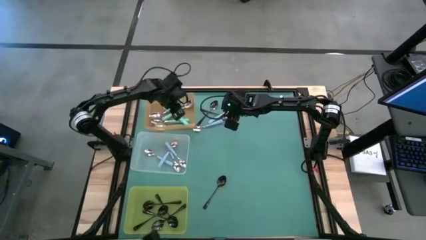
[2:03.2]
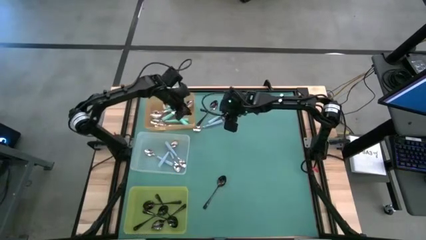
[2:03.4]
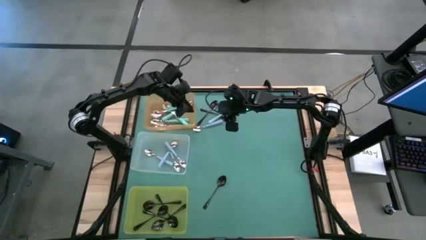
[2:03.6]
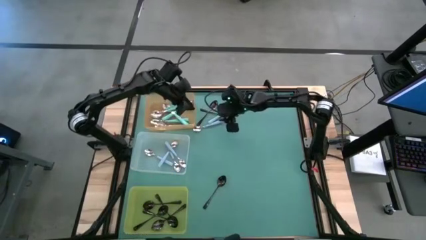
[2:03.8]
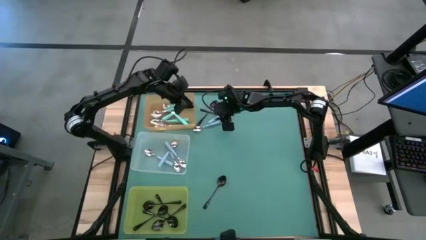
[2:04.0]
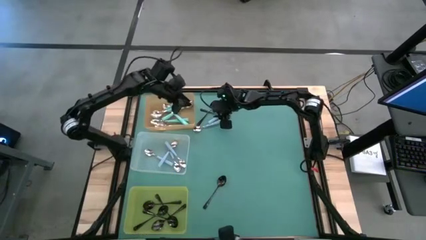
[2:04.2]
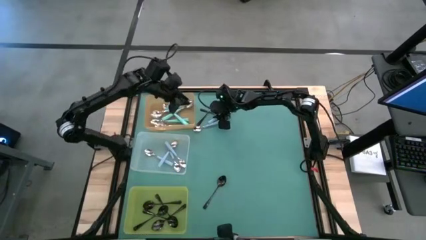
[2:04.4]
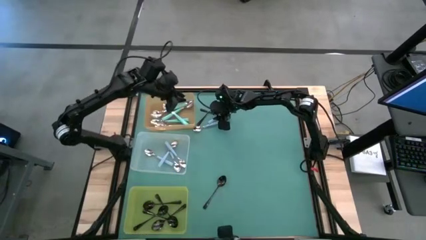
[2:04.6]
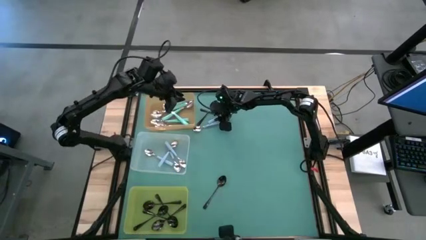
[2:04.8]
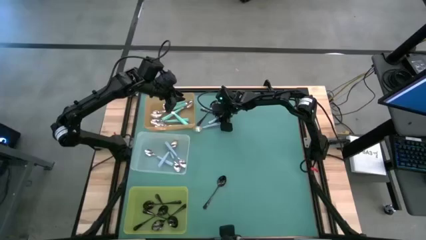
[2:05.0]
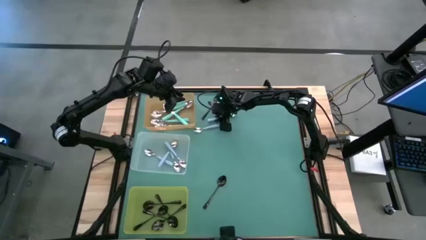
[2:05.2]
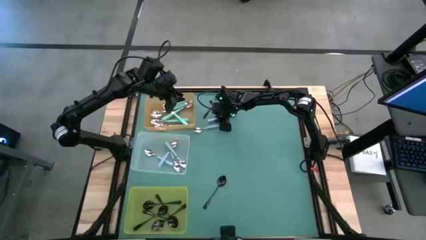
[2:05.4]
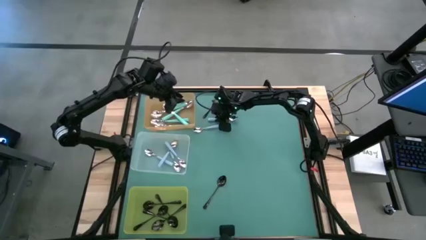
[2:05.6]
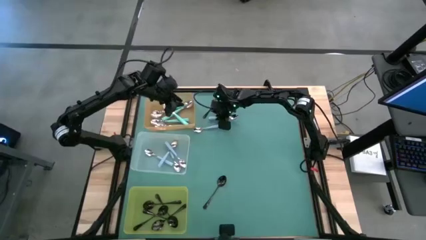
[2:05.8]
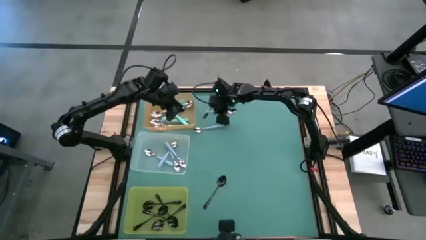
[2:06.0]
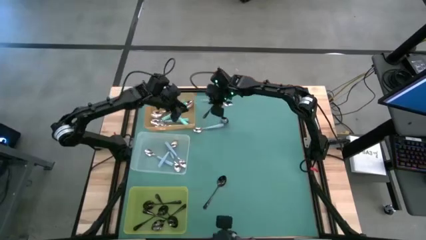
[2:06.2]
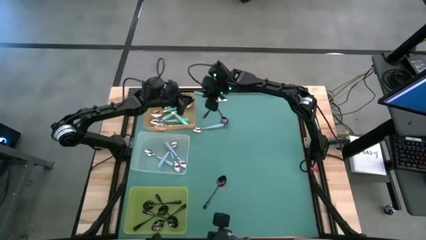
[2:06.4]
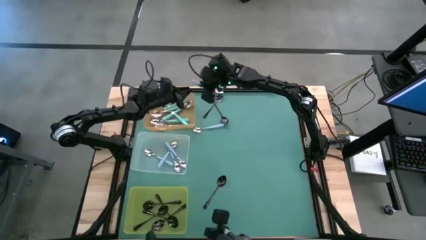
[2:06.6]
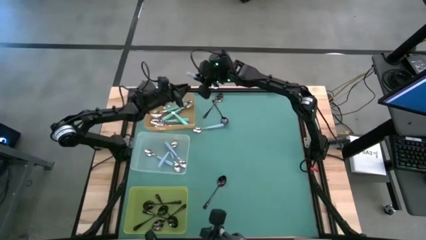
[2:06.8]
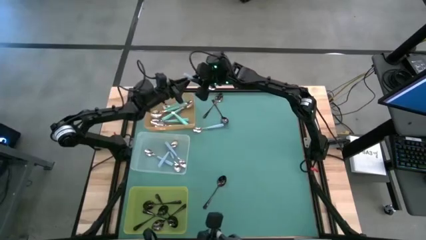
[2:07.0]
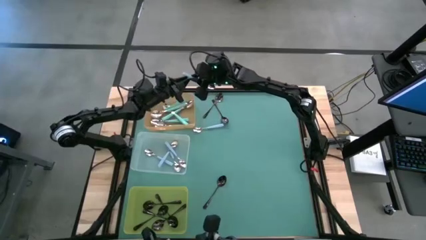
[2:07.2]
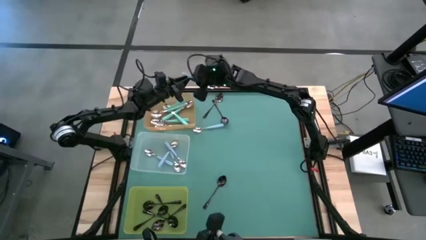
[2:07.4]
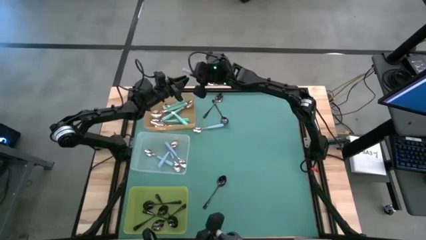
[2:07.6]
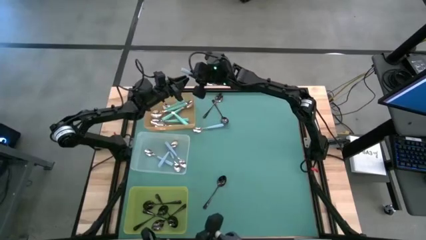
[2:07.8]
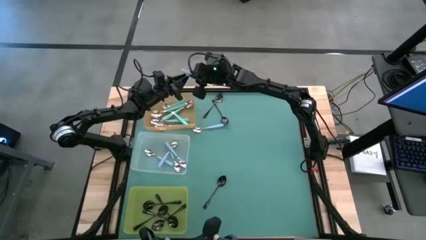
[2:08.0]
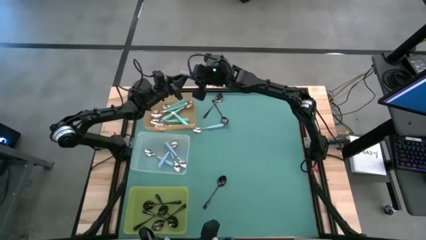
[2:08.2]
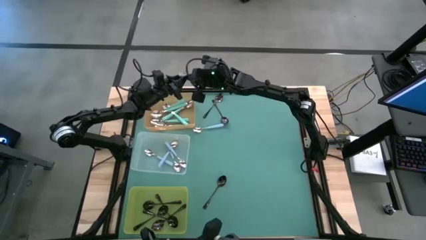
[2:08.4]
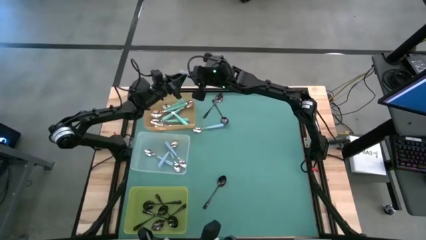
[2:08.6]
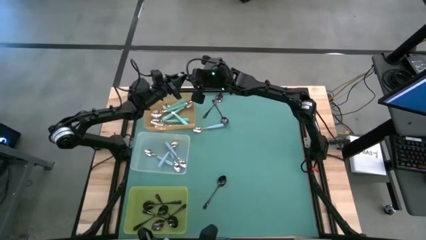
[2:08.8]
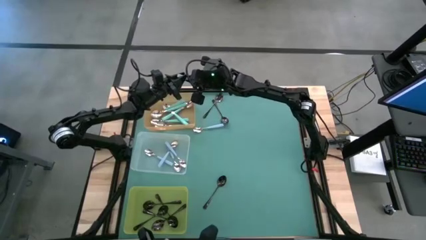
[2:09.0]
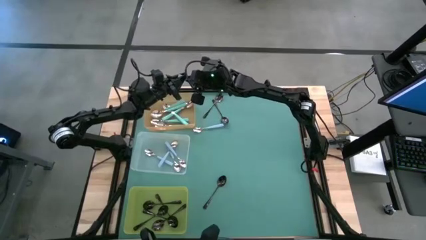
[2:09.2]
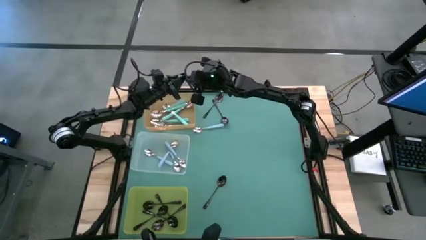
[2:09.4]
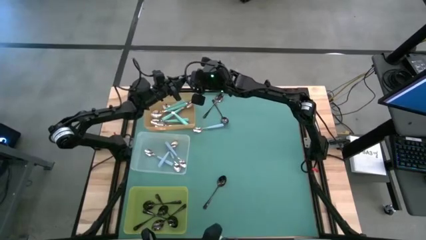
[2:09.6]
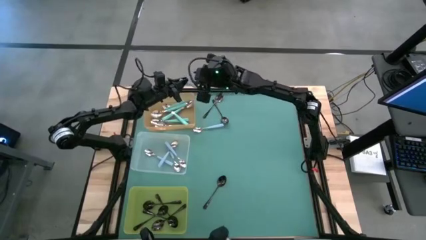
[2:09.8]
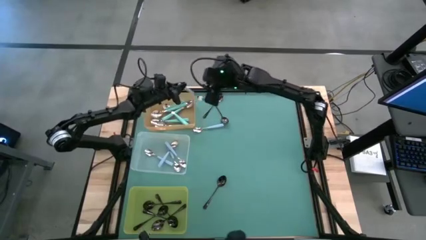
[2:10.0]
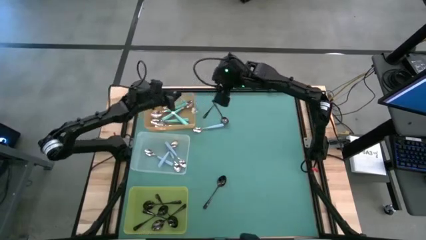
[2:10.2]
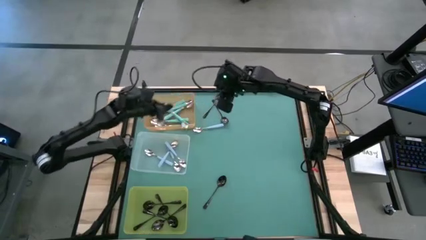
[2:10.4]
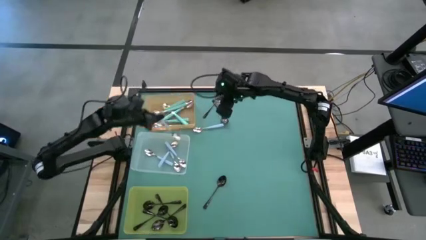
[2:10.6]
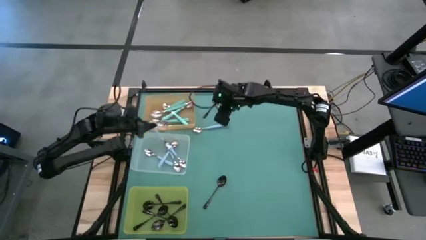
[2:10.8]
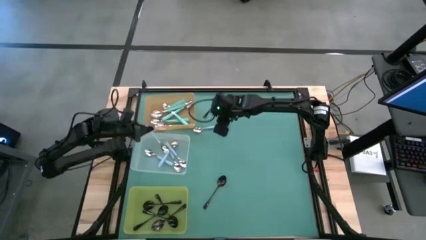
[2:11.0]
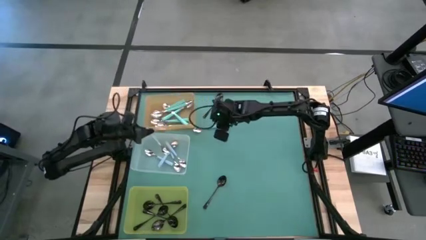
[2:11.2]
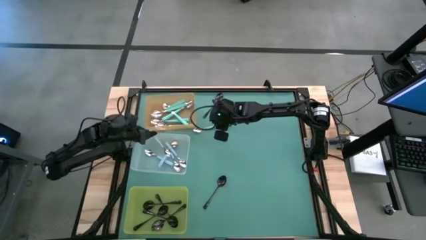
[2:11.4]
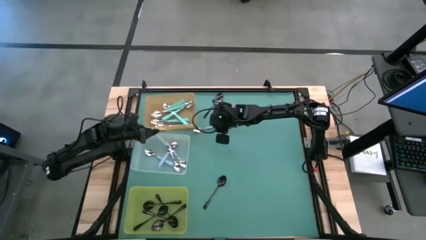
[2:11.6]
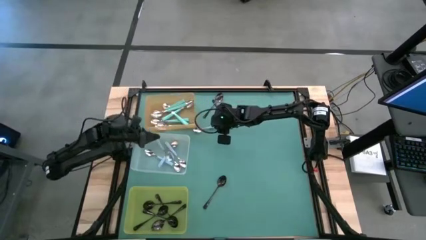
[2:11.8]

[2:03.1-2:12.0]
Task: Sort silverware by color (type)
Put the blue spoon into the transparent bin

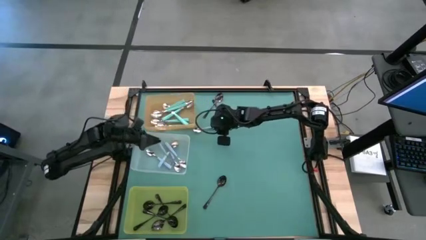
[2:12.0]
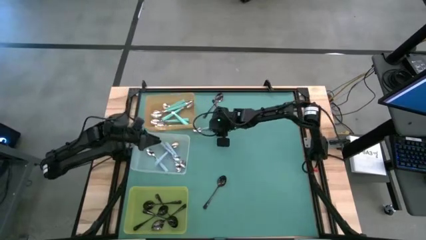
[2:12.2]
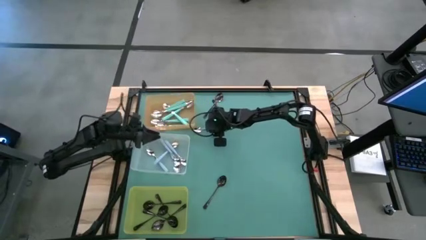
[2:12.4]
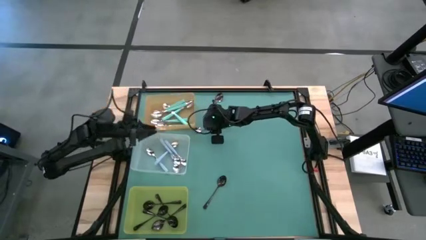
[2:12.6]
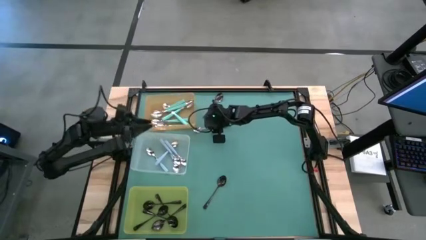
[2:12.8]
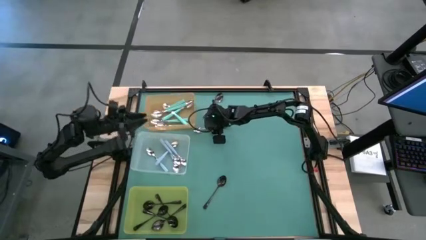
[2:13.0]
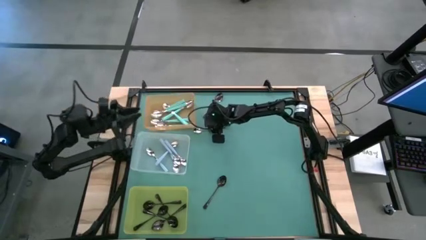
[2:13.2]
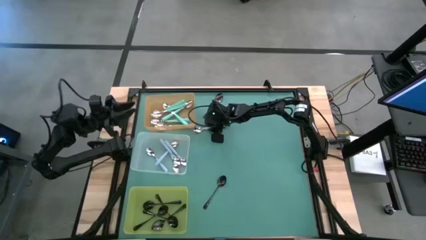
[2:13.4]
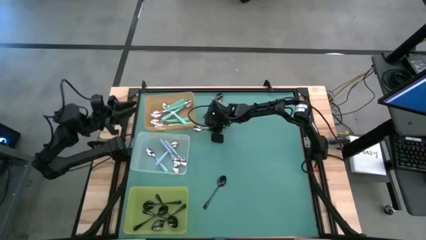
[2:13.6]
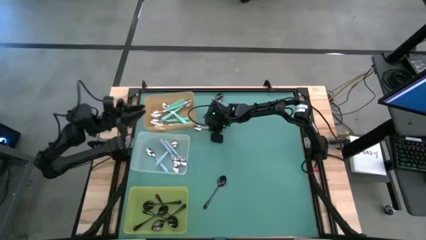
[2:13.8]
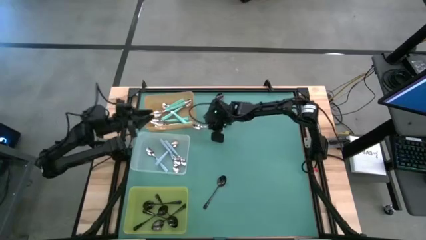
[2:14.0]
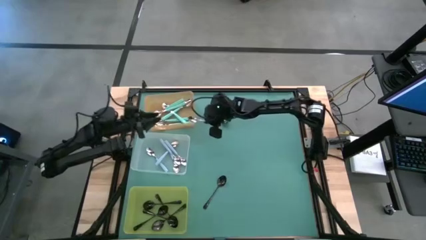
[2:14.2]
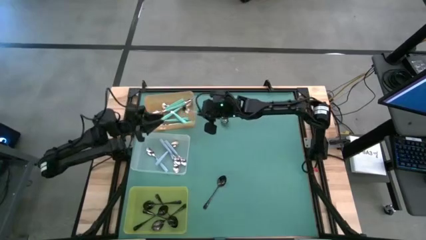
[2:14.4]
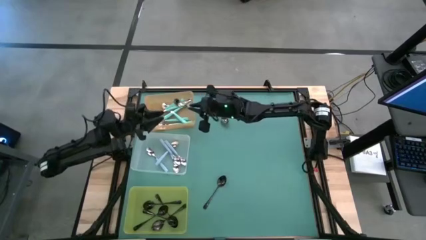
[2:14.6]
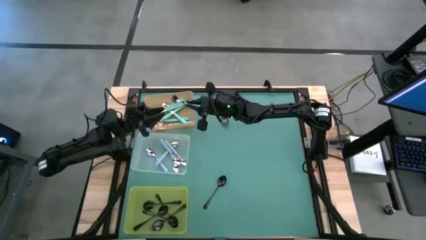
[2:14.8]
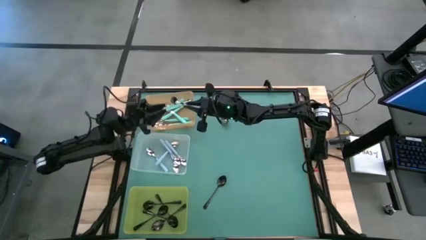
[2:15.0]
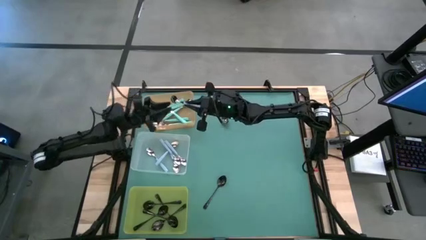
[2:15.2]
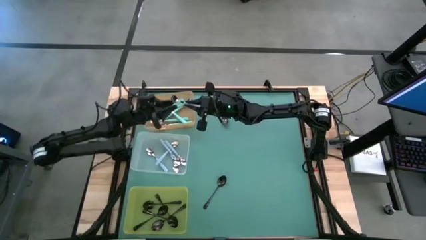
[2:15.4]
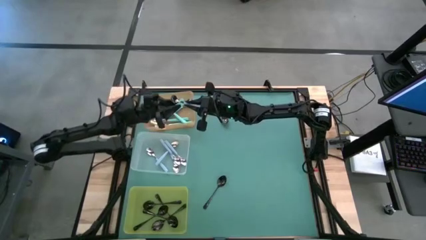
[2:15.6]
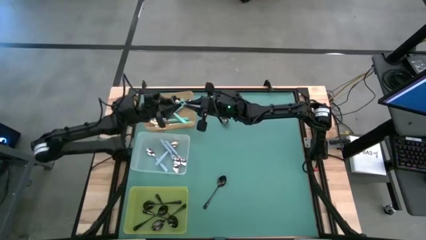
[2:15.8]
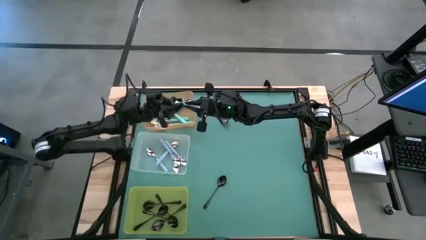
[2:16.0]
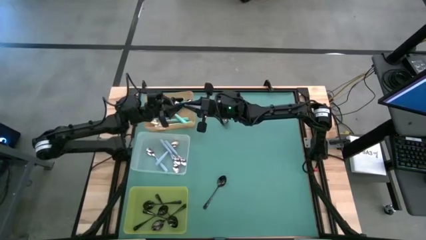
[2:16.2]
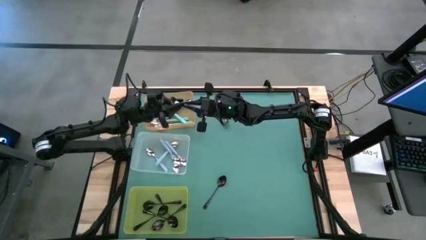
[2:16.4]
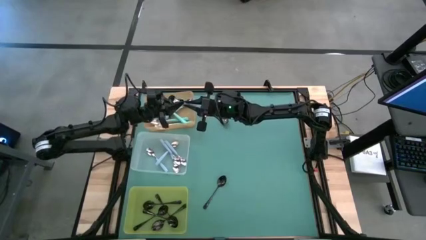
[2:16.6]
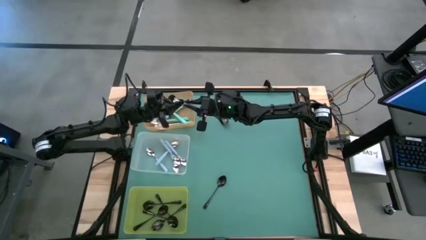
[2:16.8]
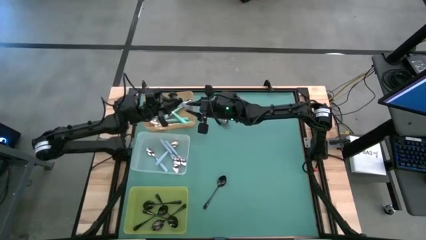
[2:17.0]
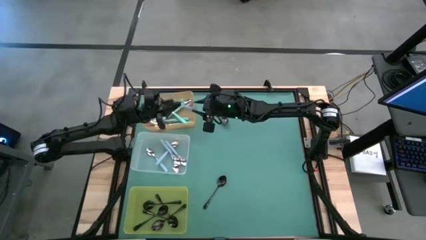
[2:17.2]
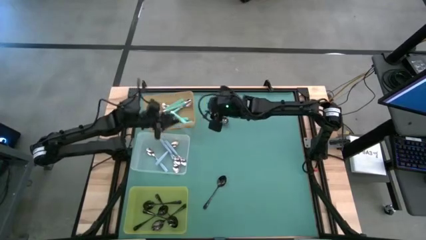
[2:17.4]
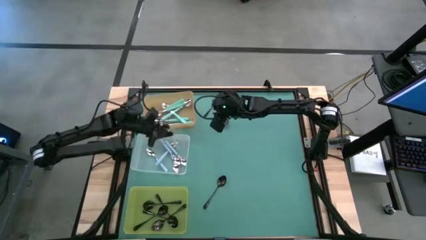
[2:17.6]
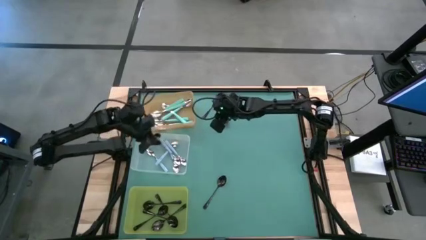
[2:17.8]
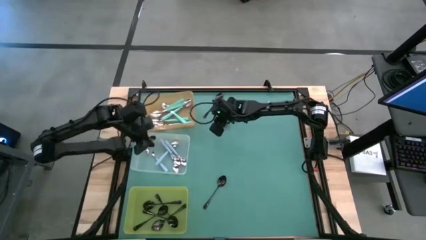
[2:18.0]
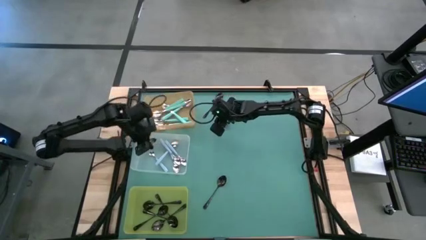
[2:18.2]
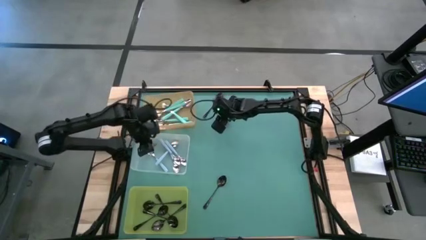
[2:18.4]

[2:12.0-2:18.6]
Put the blue spoon into the transparent bin
